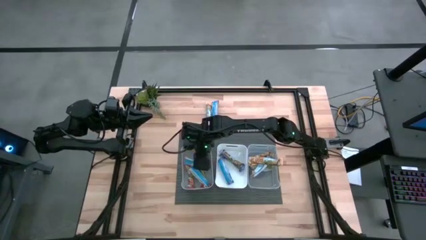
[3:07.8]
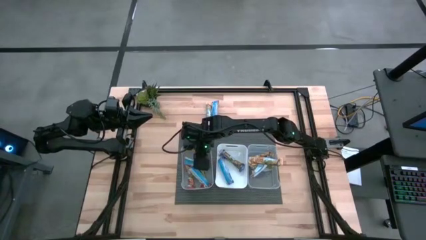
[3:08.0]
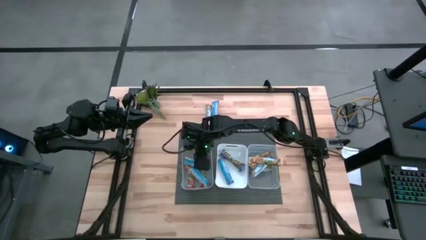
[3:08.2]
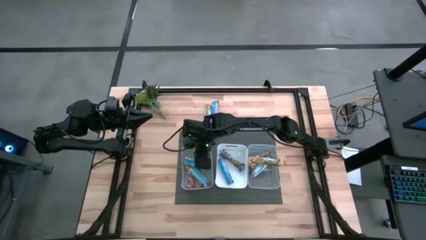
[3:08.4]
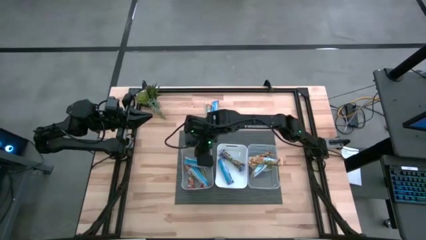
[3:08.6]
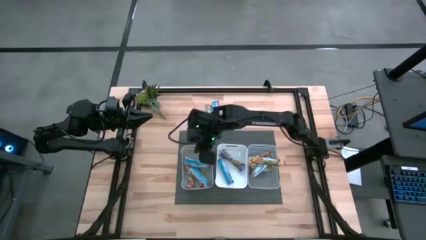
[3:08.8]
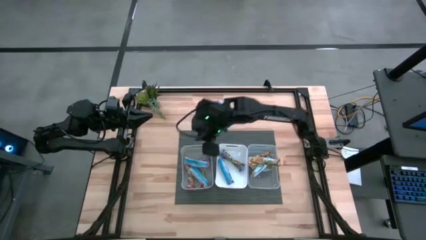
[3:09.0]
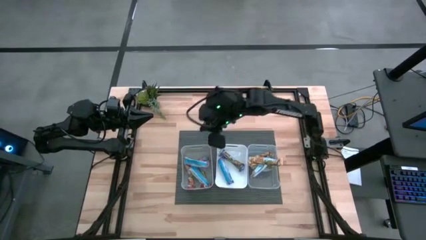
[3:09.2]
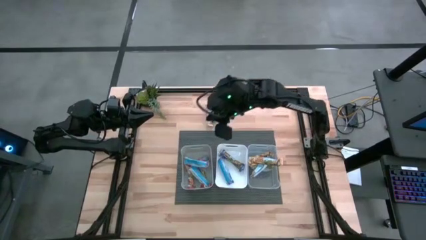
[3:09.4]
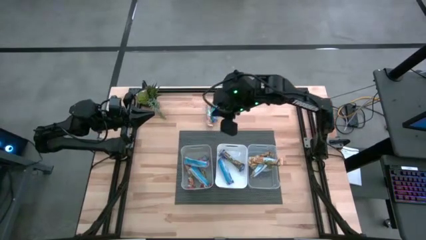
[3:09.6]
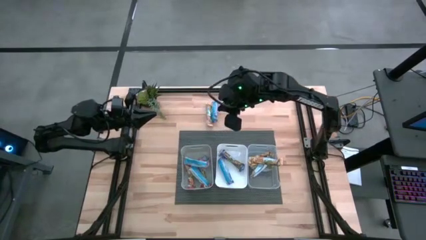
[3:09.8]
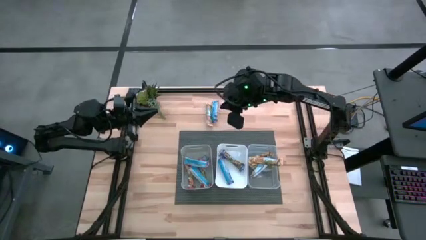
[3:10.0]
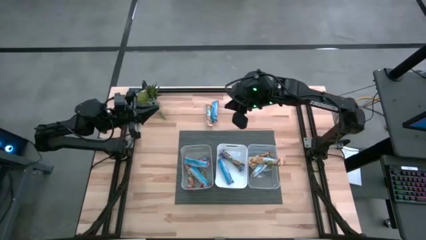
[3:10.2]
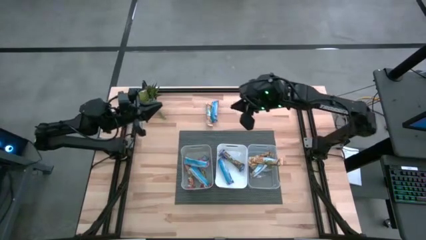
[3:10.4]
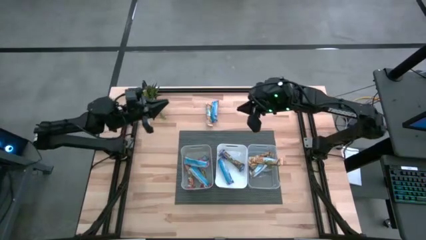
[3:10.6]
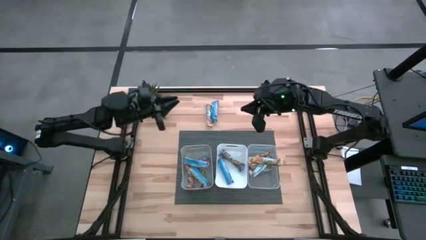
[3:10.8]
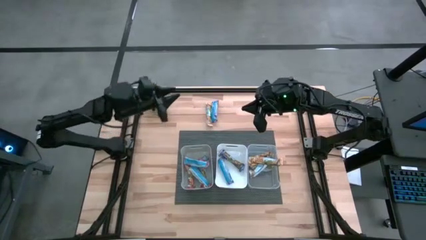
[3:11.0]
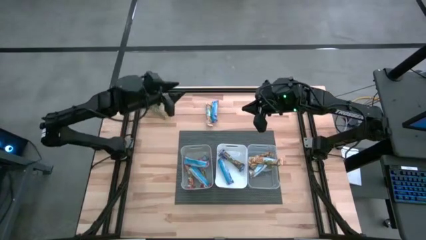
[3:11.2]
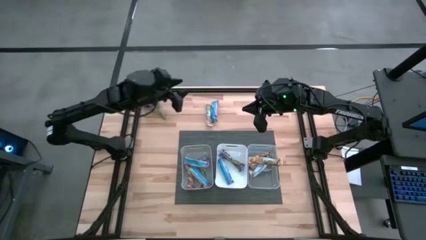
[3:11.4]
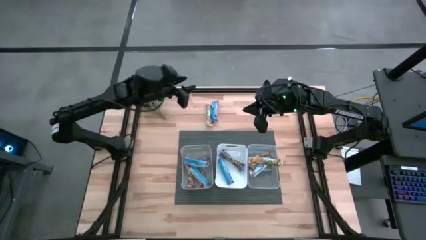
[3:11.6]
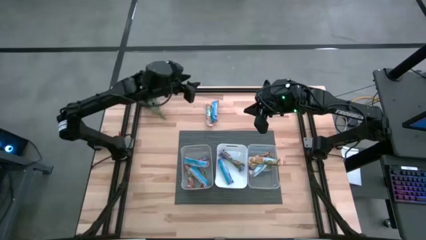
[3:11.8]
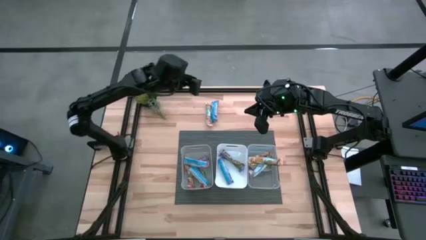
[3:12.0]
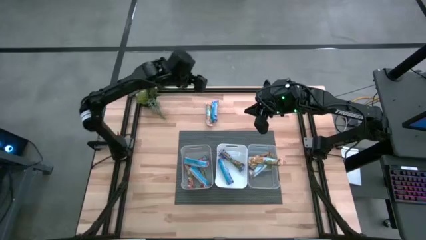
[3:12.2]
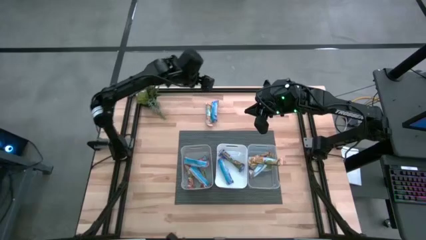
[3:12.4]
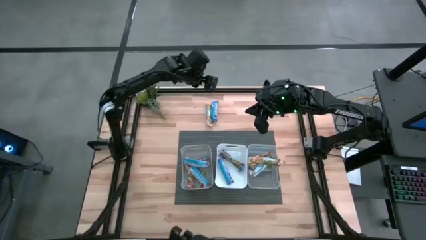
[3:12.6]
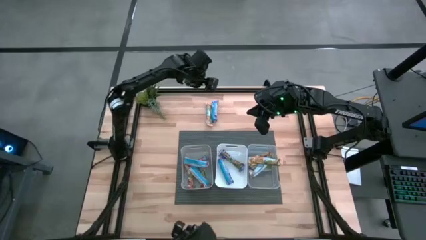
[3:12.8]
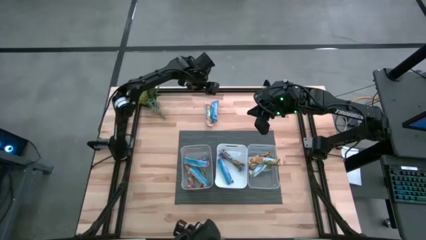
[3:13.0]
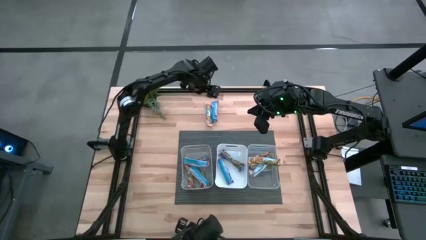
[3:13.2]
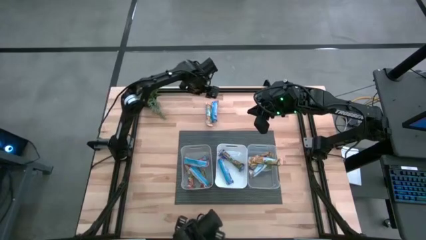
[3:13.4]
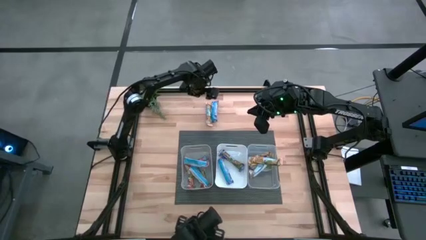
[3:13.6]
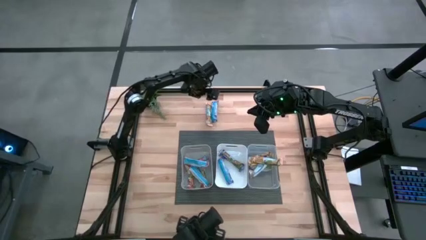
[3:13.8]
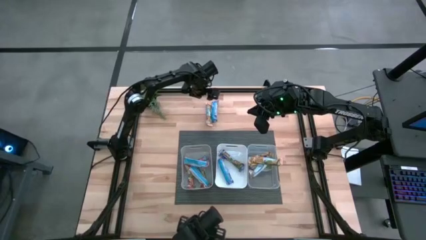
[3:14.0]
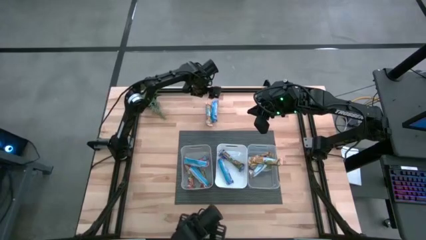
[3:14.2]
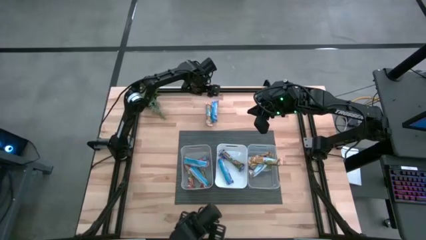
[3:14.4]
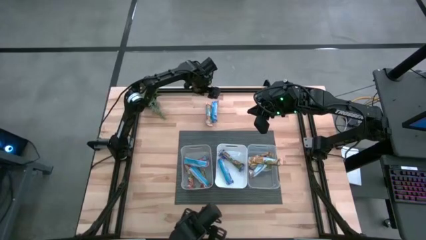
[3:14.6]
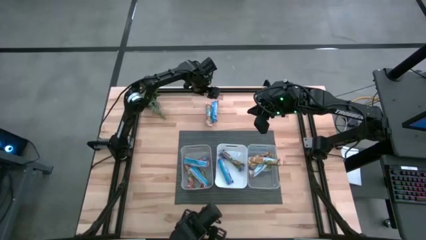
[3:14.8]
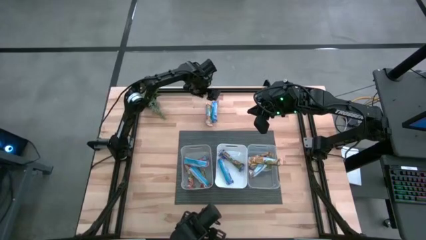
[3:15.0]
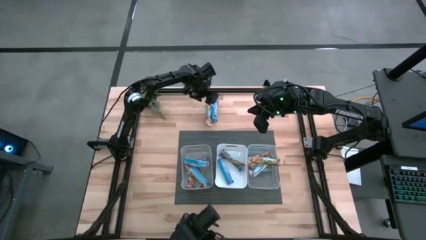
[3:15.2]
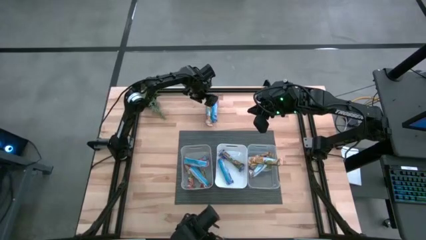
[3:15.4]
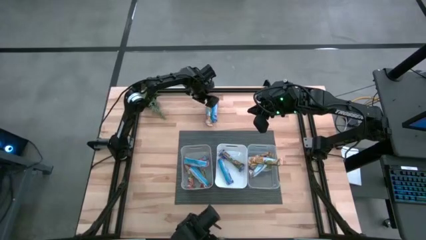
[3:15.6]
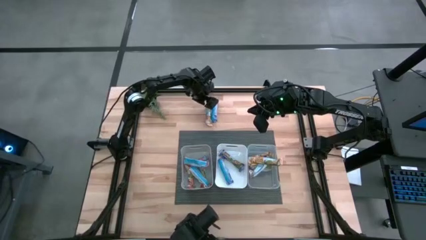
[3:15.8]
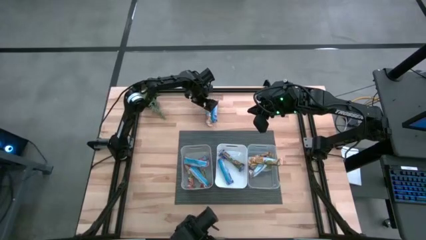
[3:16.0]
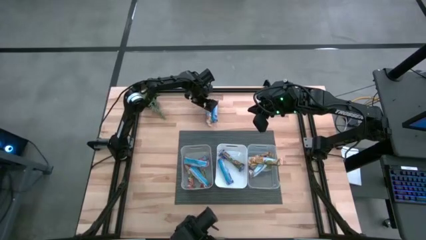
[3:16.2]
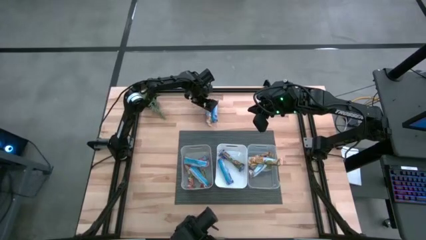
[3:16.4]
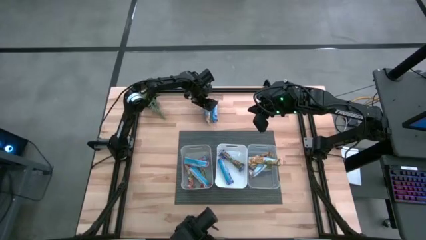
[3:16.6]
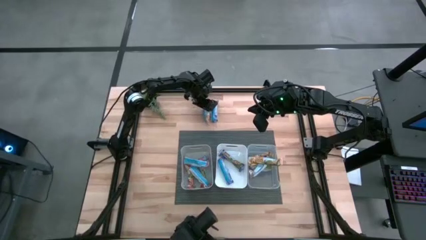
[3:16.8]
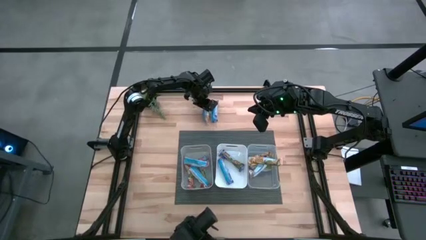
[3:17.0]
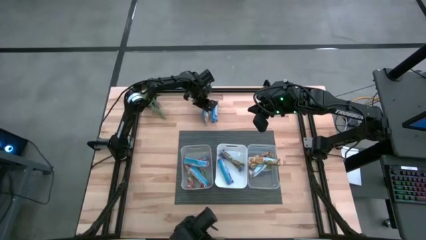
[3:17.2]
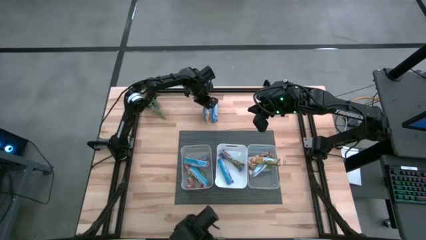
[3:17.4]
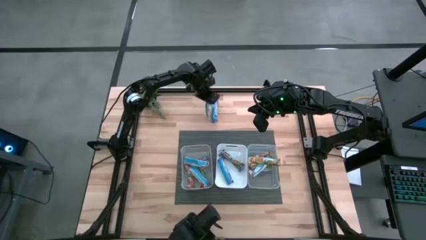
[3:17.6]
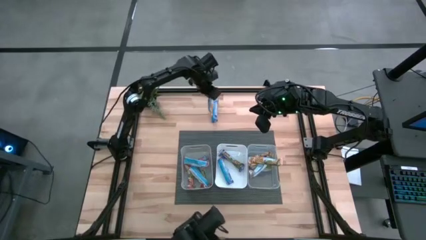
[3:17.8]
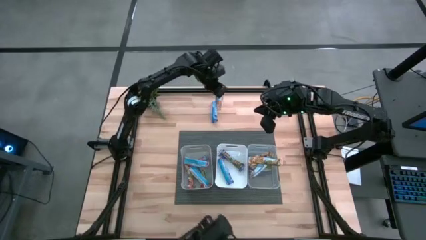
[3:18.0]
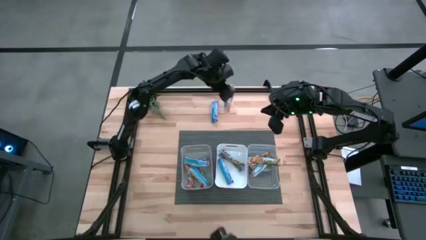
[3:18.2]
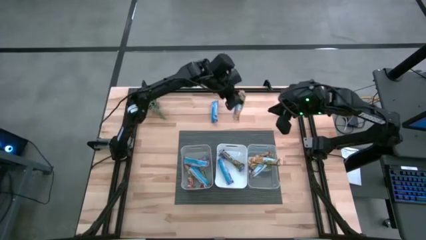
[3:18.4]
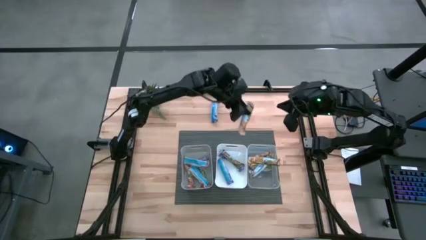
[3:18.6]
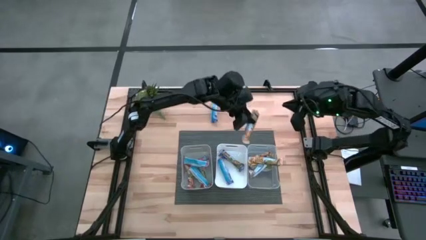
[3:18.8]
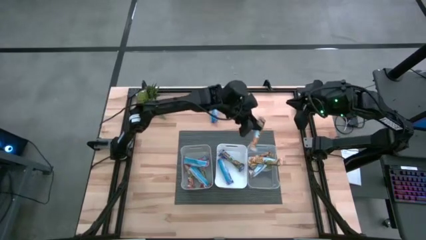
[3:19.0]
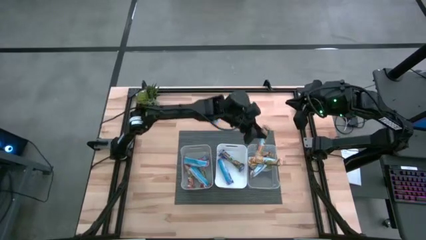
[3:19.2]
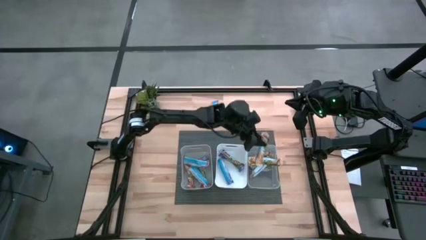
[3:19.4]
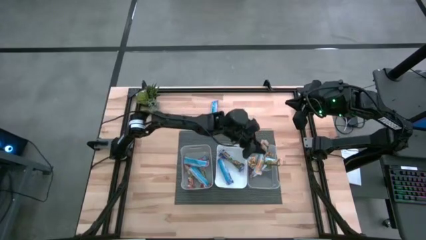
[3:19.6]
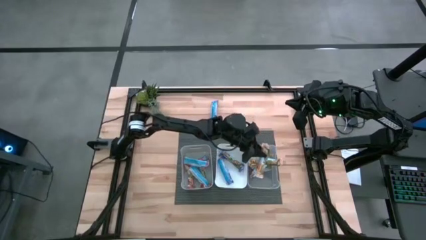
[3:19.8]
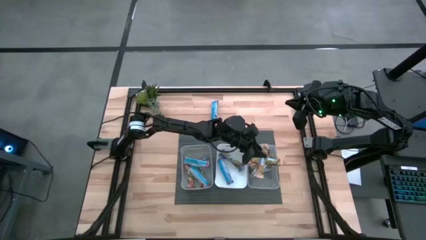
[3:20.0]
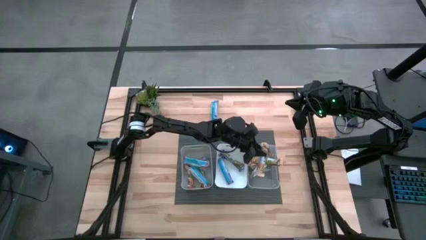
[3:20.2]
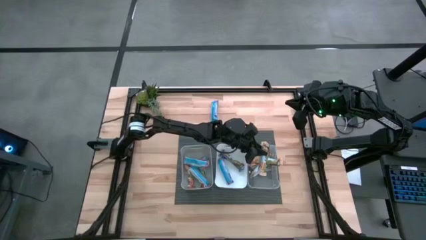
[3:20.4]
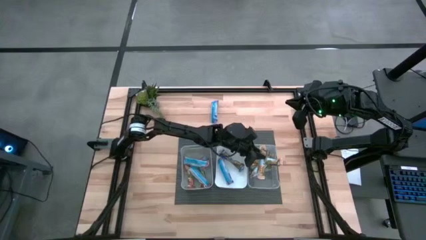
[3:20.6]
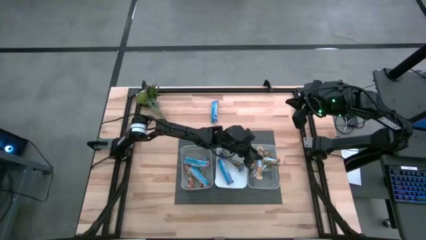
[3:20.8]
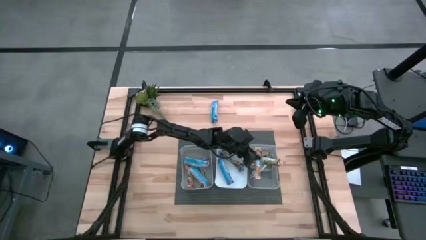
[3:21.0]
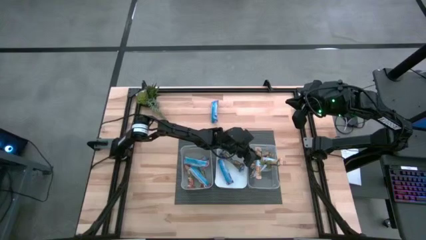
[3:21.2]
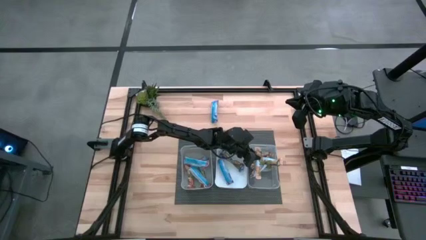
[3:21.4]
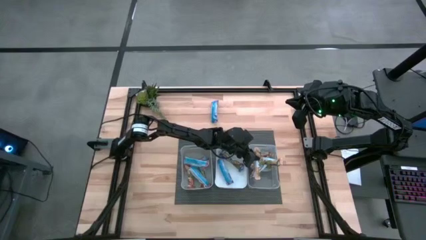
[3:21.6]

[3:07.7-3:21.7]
Task: Pick and place Granola Bars by type
Put the orange granola bar into the transparent bin

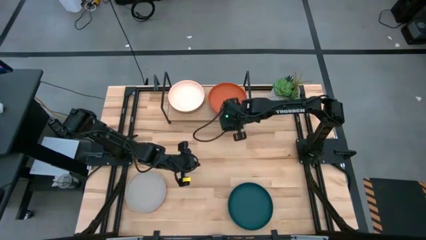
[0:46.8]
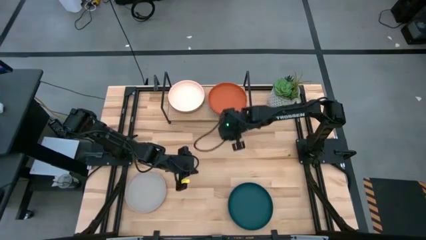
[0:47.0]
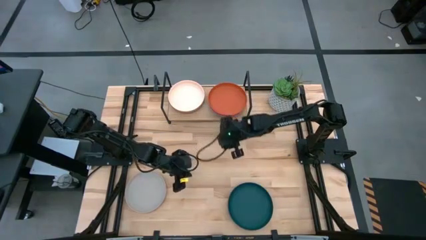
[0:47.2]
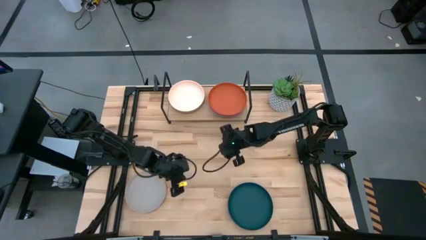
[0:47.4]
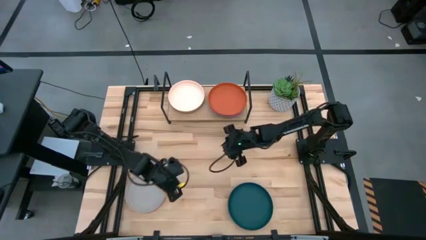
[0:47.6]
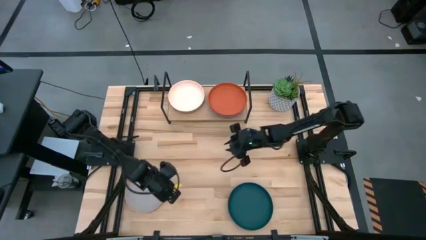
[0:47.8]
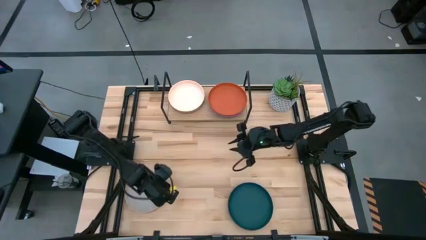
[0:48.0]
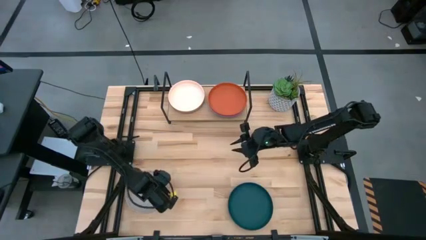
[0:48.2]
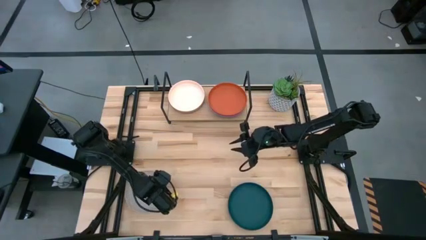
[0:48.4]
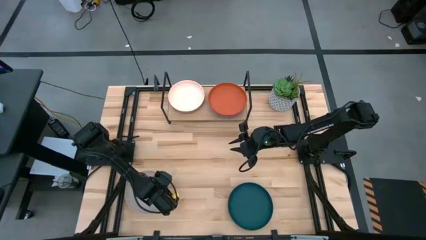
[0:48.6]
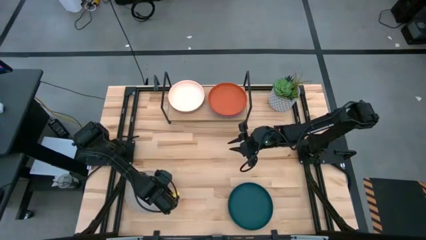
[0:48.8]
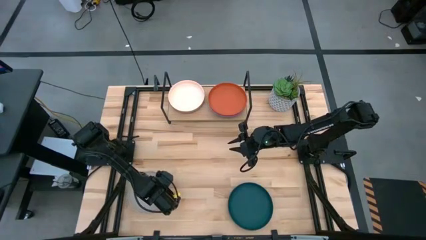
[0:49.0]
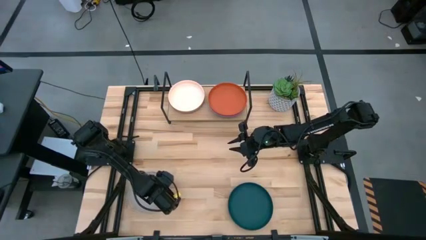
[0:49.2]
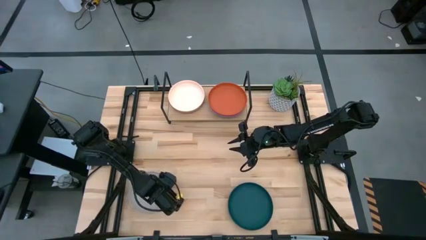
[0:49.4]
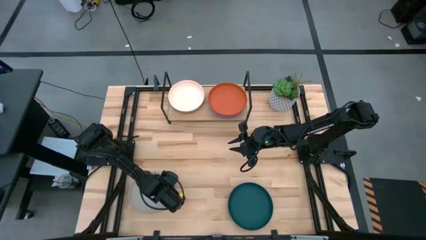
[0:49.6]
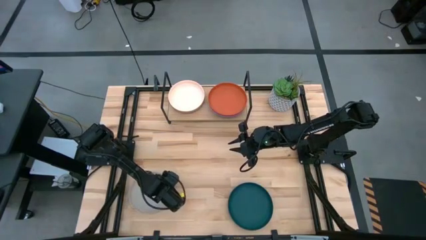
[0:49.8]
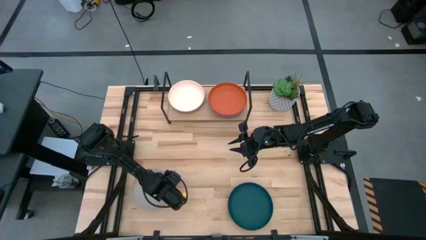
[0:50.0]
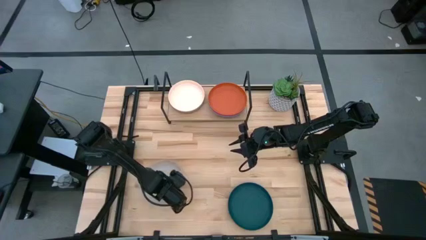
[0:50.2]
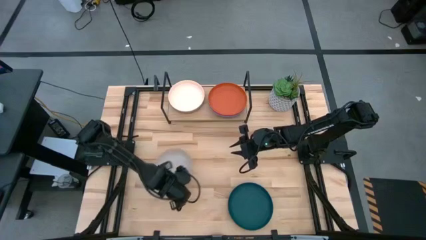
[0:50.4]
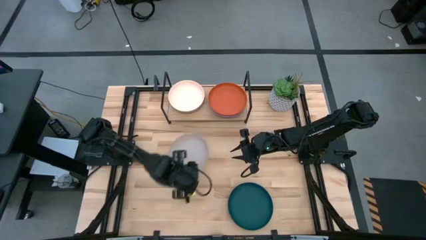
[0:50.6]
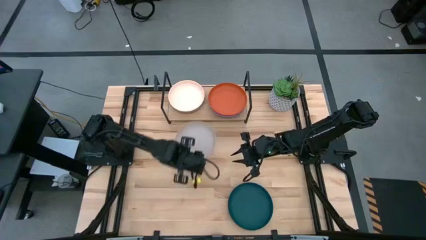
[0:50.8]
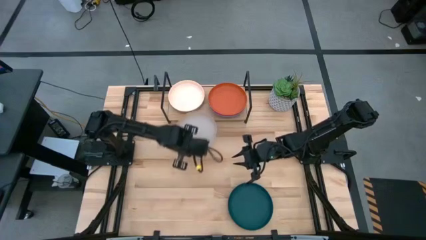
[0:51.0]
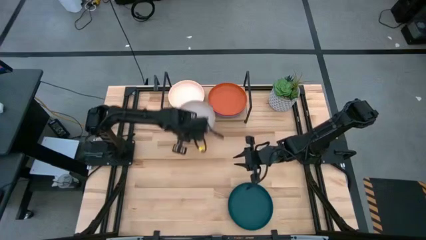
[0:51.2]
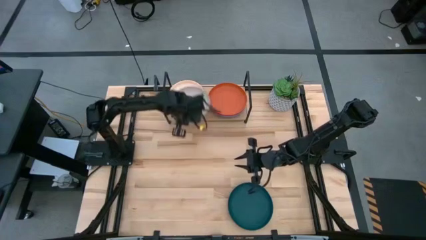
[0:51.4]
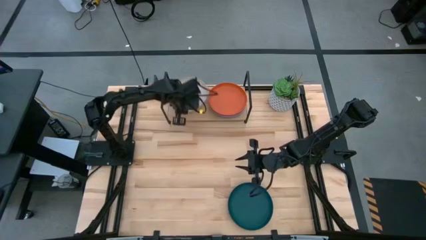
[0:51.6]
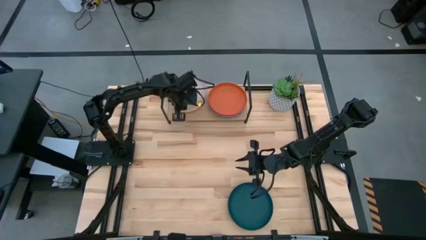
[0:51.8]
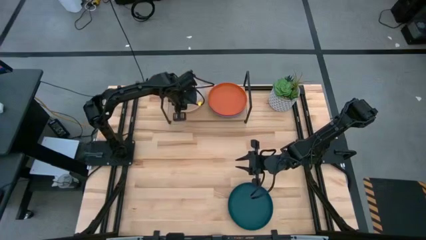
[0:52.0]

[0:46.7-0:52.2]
Task: Place and stack plates onto a shelf
Stack the gray plate on top of the peach plate on the shelf
